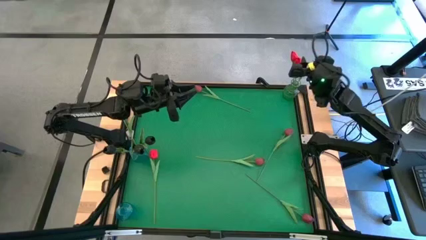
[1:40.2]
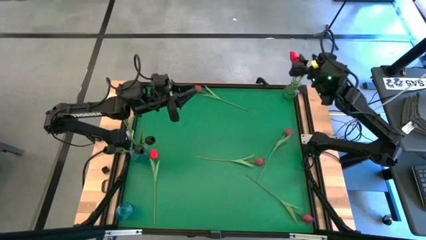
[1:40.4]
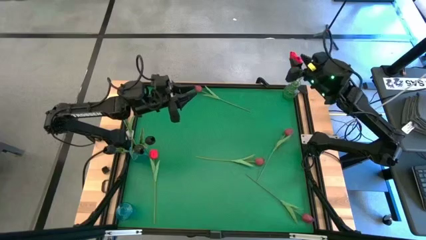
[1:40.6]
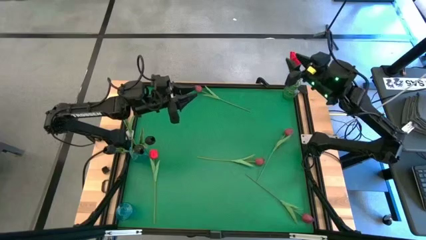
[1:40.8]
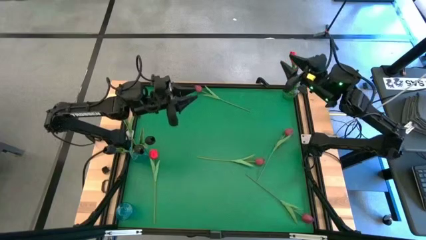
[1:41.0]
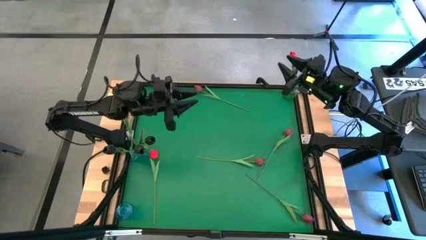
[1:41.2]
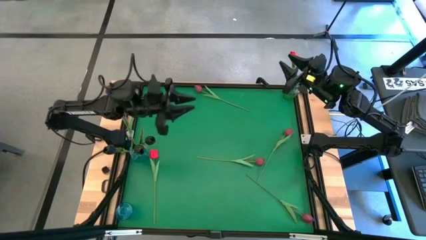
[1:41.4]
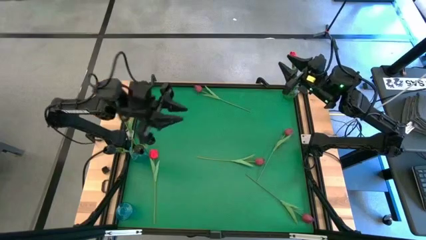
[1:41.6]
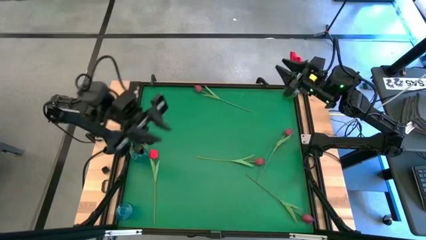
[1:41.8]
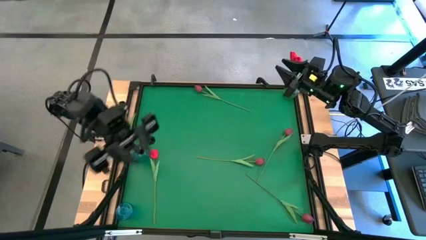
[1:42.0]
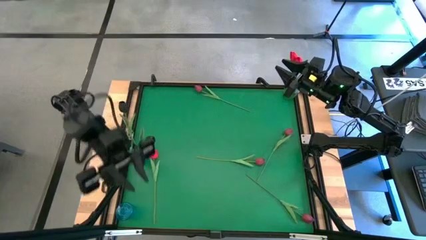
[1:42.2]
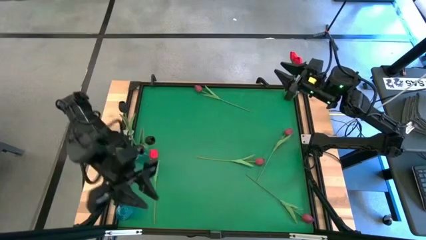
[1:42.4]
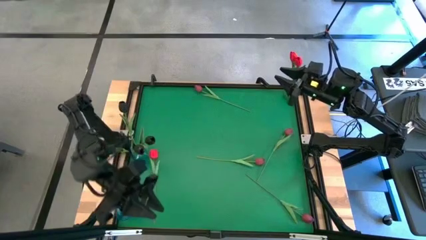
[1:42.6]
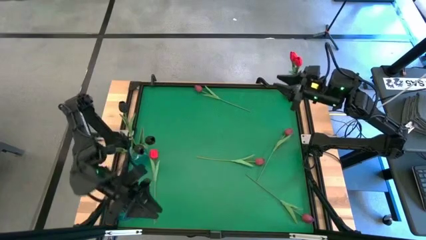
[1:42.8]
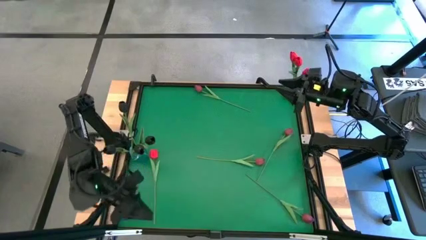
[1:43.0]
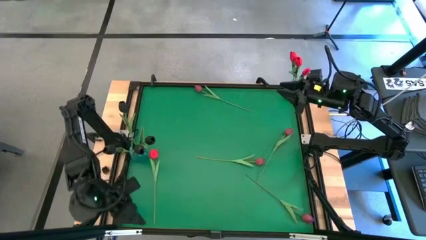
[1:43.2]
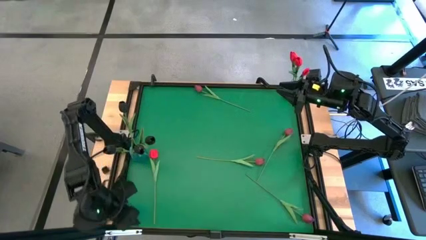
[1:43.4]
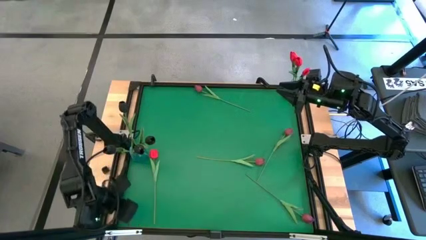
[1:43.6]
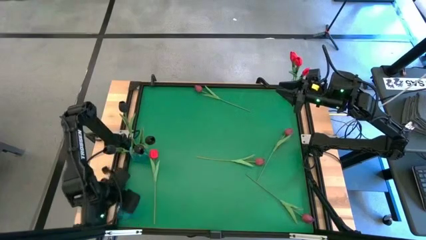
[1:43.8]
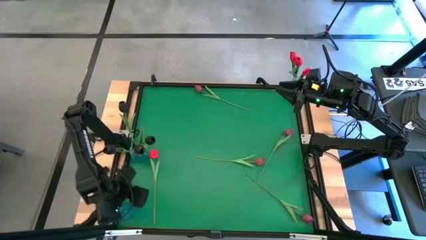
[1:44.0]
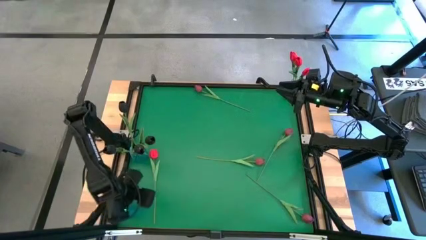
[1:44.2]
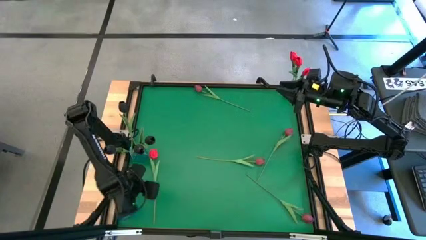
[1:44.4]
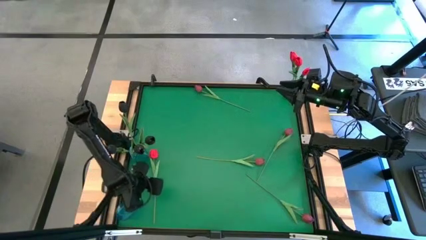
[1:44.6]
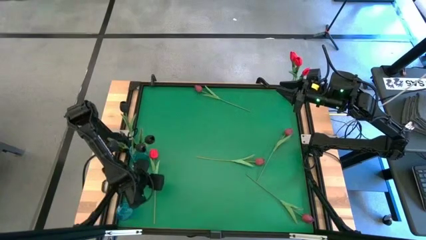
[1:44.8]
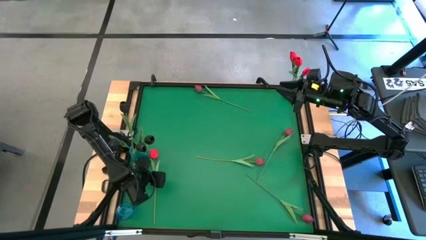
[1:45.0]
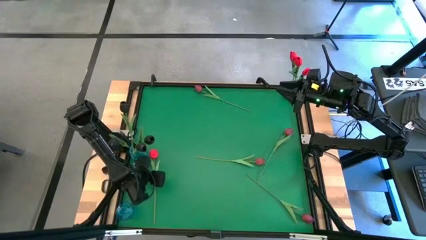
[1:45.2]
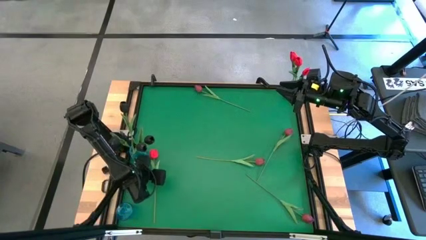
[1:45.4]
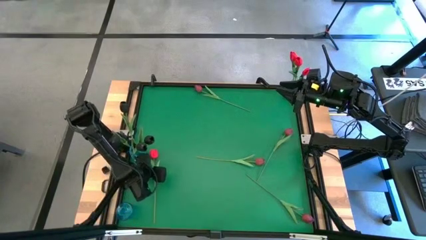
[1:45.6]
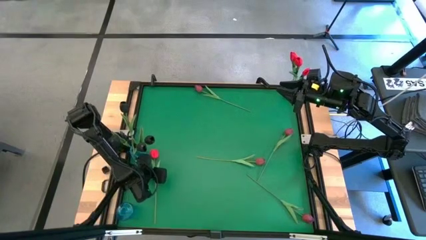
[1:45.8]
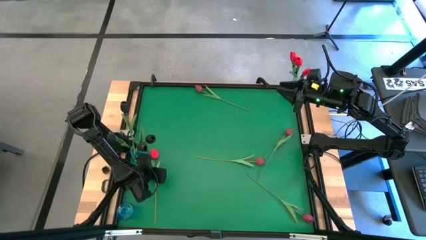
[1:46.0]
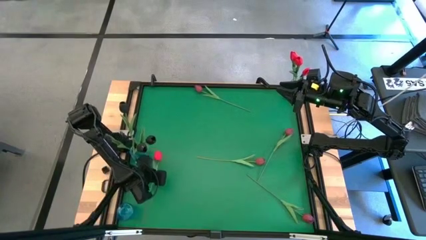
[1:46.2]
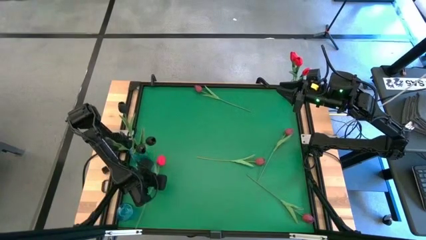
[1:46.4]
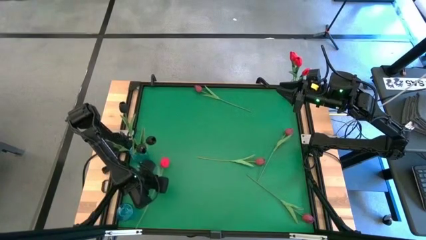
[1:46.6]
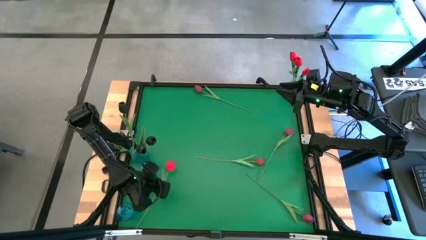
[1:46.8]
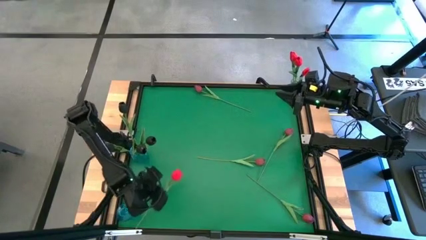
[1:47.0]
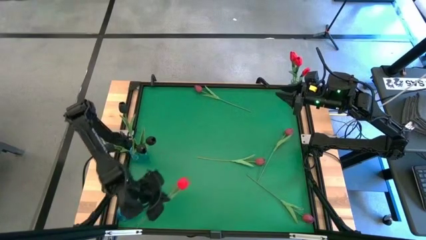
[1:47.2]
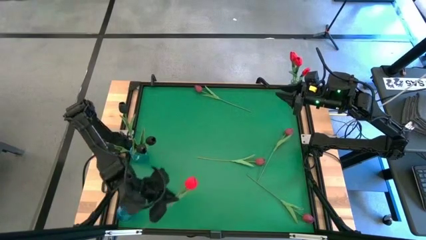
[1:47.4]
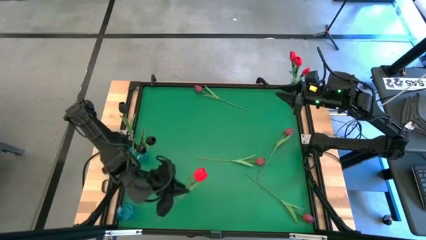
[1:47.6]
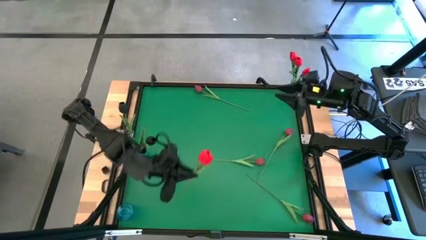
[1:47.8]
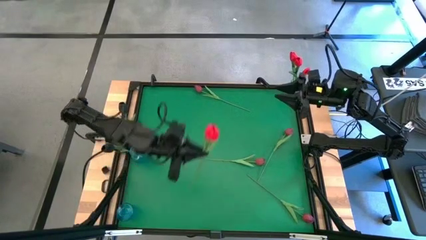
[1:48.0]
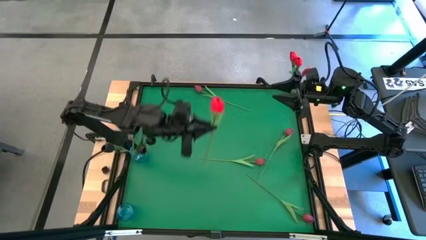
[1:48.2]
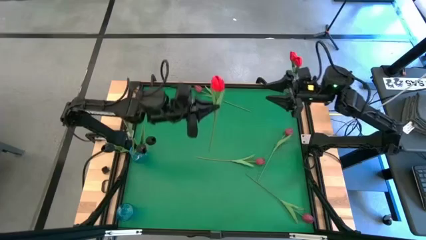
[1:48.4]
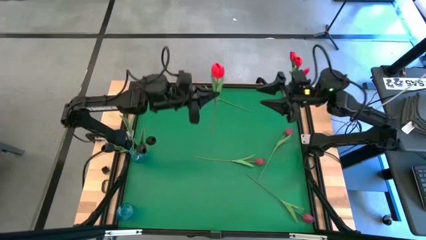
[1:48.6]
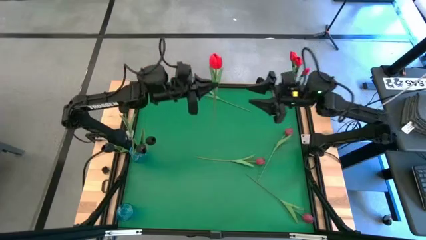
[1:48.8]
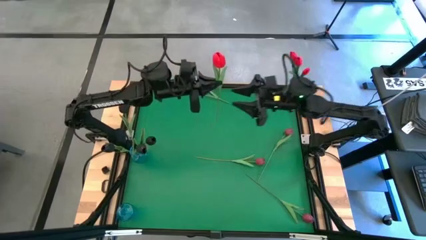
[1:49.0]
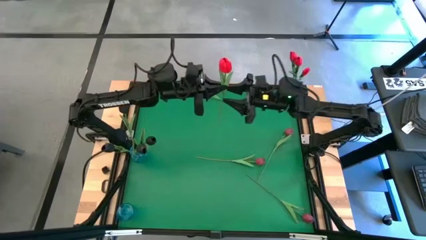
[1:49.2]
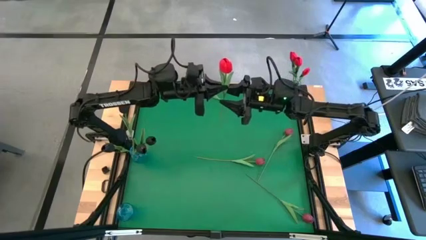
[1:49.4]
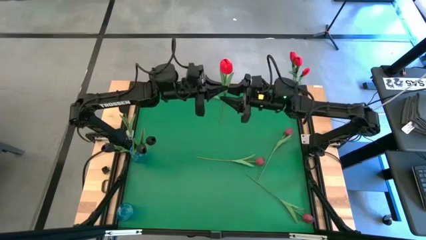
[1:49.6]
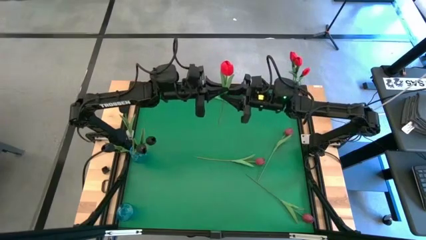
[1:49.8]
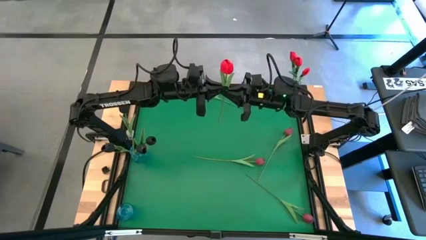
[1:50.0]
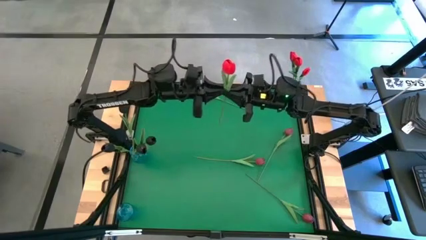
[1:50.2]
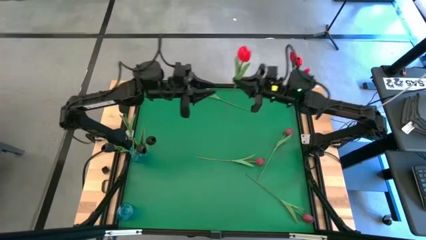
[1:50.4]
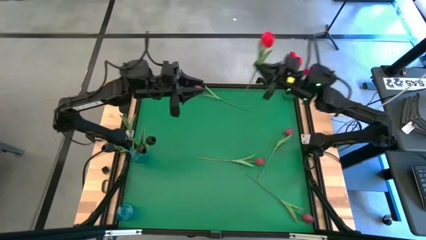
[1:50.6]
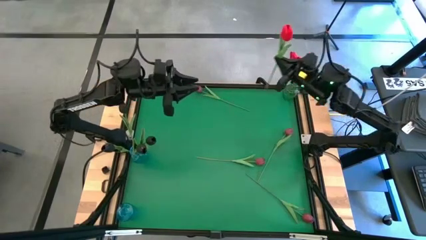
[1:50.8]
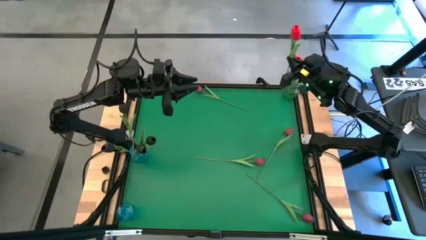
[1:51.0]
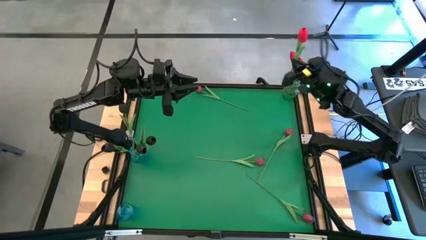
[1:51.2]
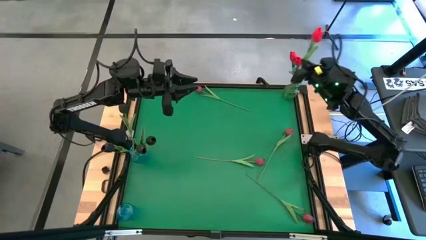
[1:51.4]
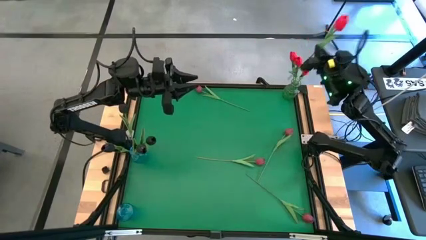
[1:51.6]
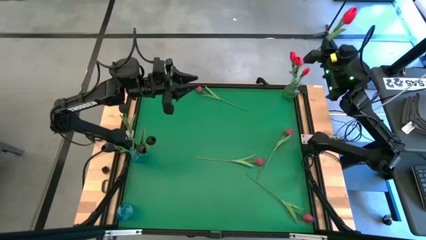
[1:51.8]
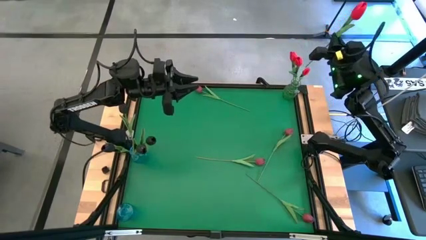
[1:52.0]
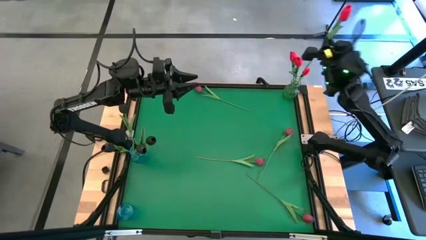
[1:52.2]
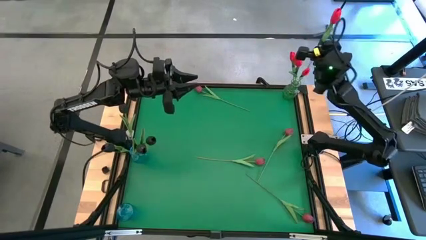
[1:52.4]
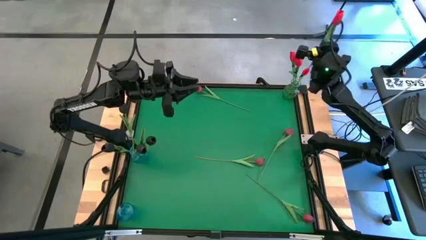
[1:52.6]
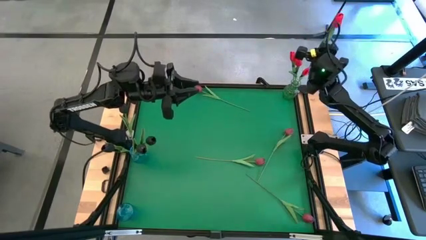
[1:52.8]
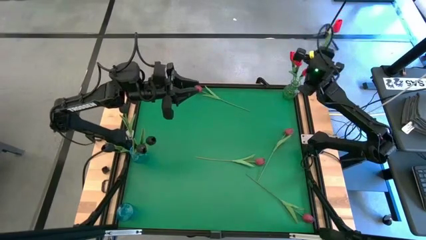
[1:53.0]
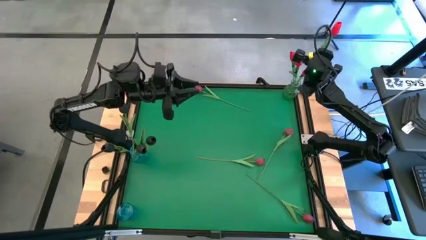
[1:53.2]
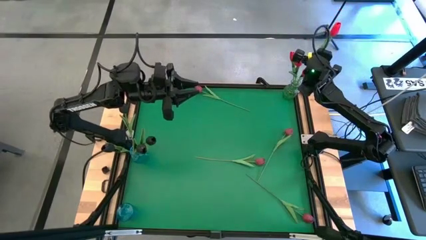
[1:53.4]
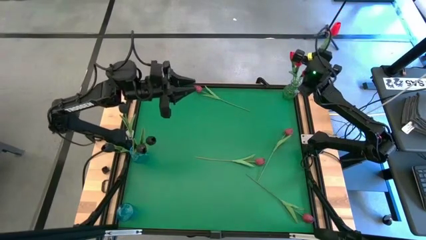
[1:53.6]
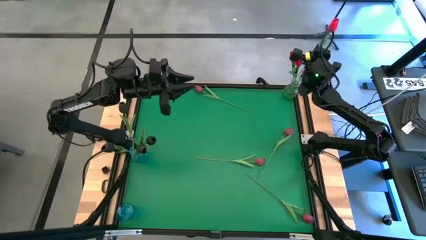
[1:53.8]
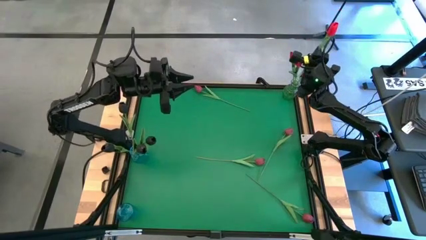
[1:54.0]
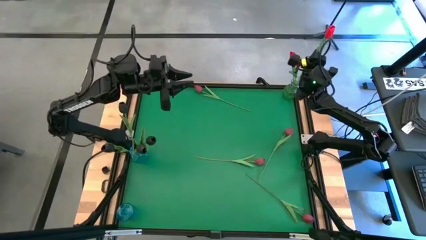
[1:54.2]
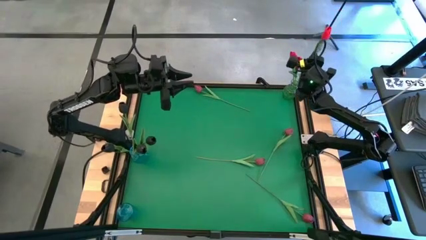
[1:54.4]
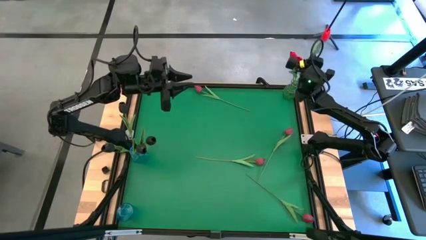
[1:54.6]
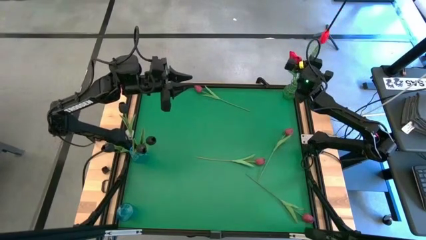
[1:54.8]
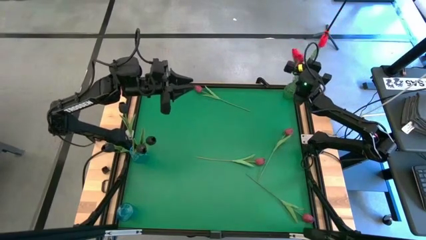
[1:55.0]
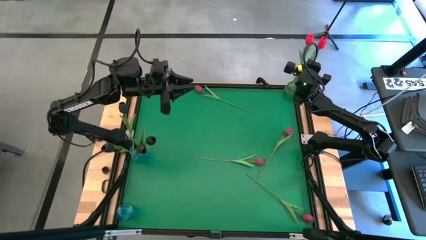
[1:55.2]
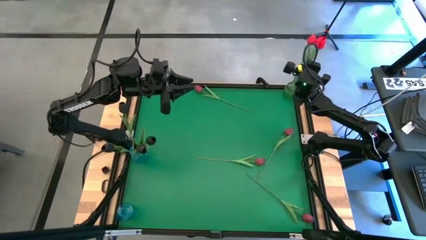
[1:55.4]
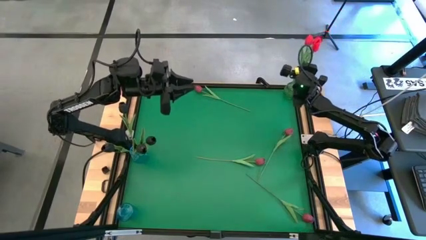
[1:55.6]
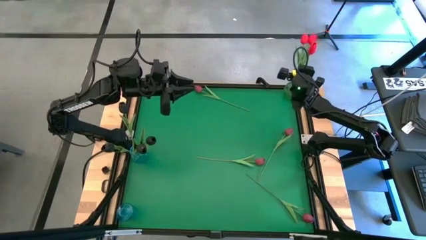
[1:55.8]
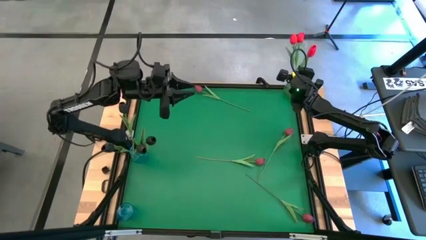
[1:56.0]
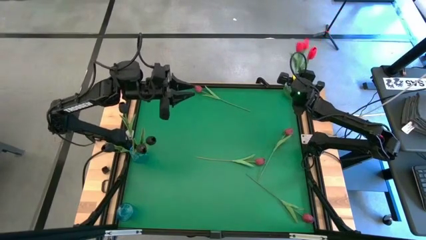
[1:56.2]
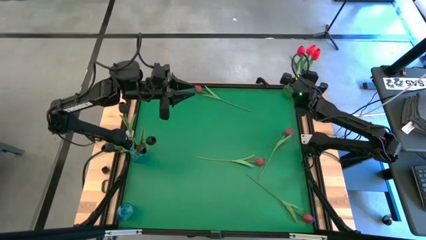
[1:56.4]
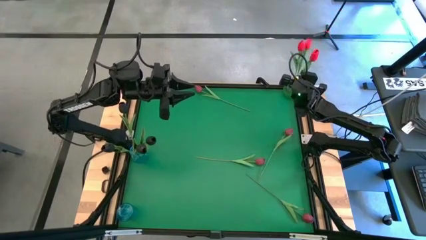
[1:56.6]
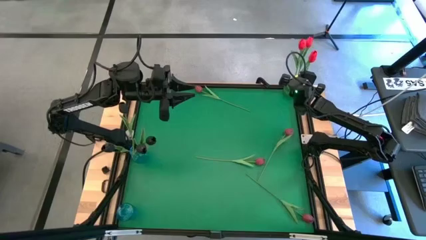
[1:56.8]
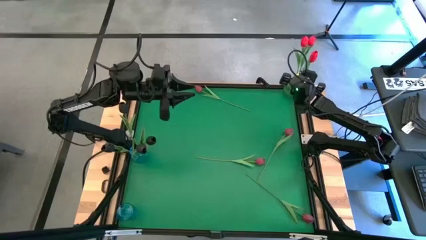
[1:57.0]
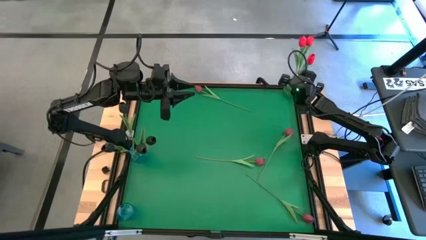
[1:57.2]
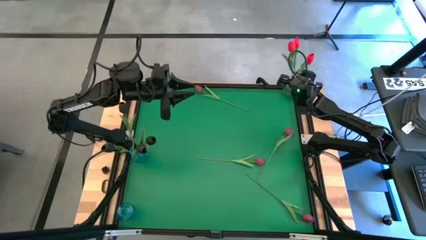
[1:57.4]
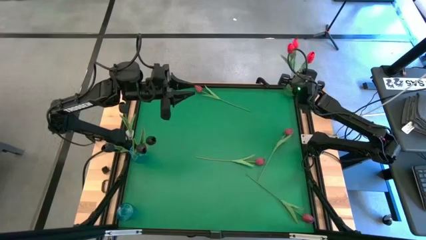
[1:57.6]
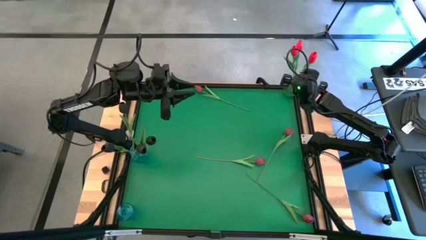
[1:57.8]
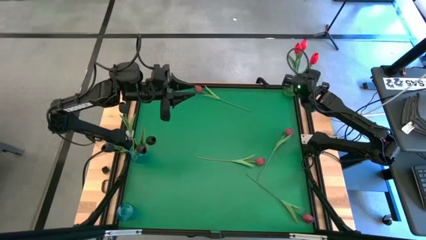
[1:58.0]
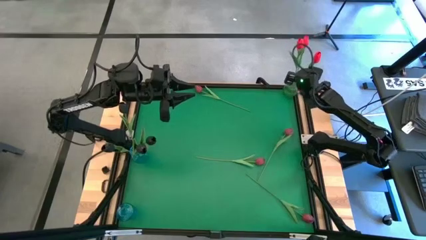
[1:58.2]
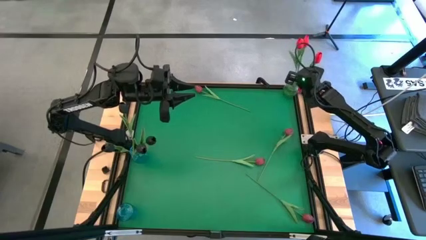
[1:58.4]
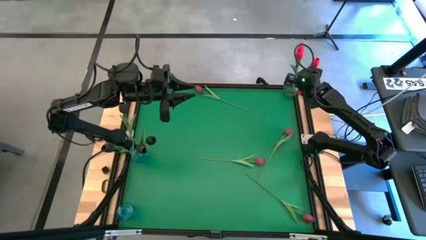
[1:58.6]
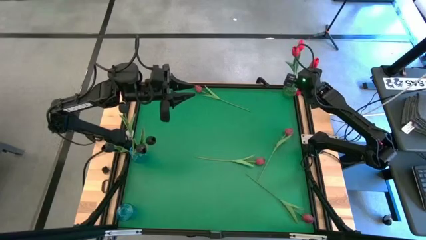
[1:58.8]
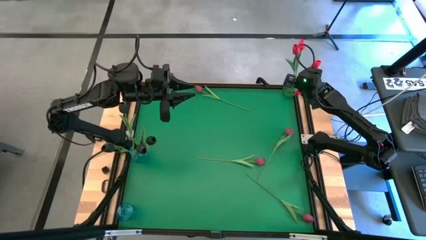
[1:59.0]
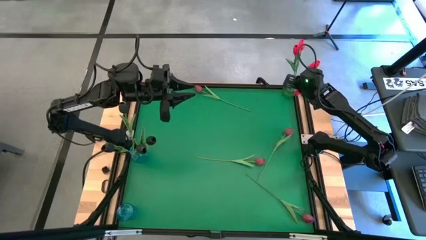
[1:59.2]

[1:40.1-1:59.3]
Task: Sort flowers into vase by color
Put the red tulip into the green vase
